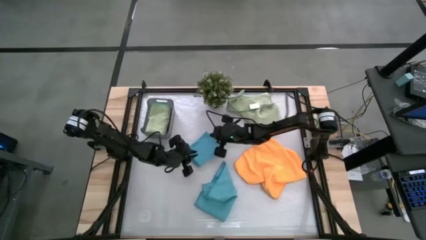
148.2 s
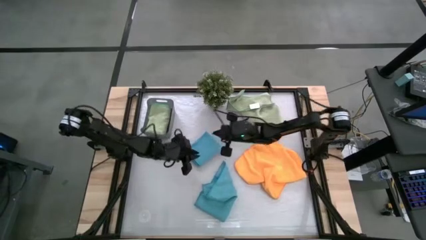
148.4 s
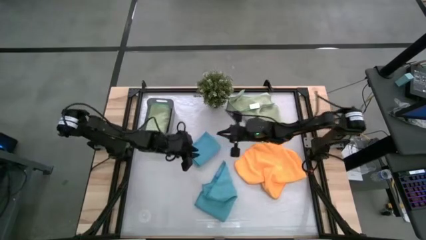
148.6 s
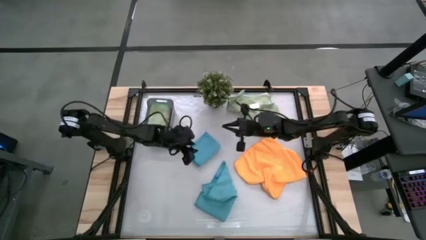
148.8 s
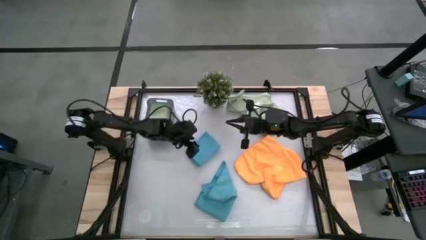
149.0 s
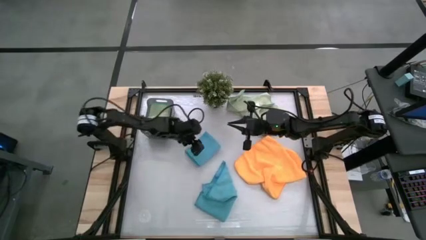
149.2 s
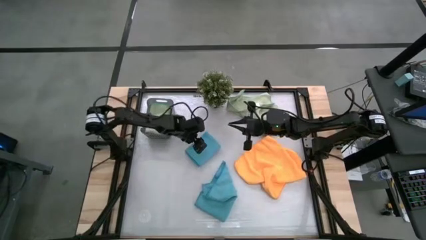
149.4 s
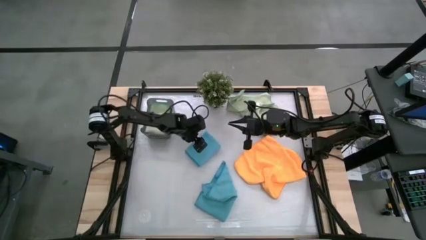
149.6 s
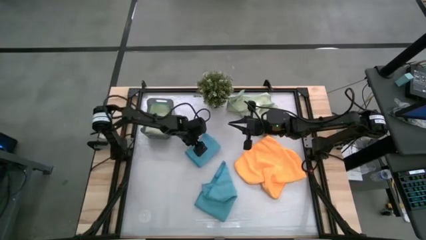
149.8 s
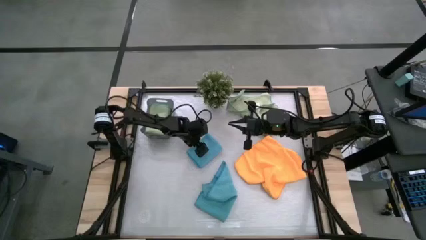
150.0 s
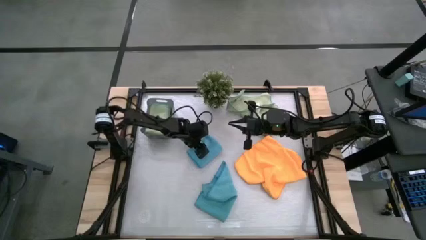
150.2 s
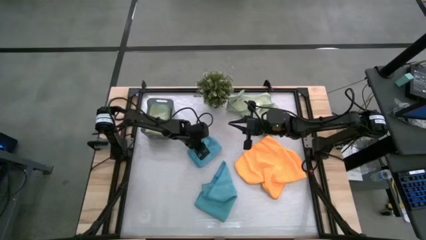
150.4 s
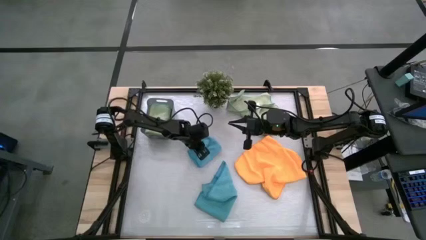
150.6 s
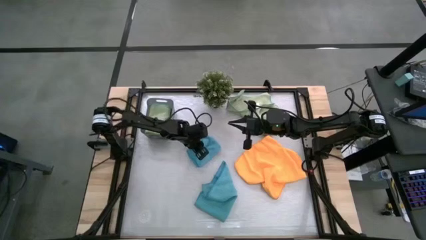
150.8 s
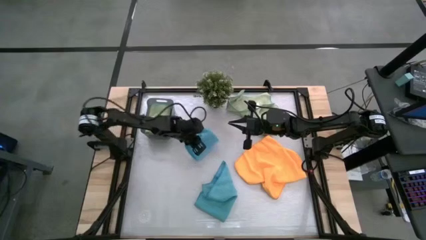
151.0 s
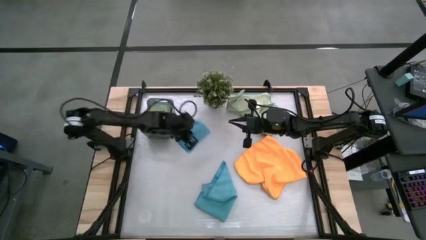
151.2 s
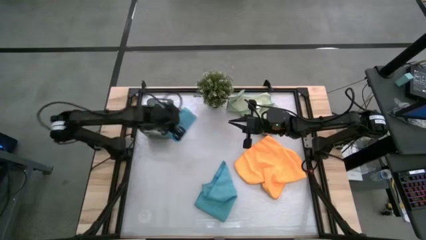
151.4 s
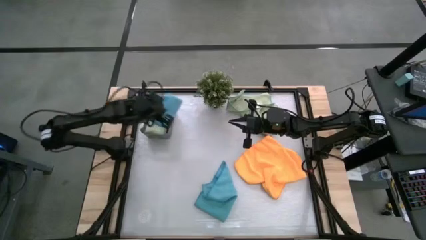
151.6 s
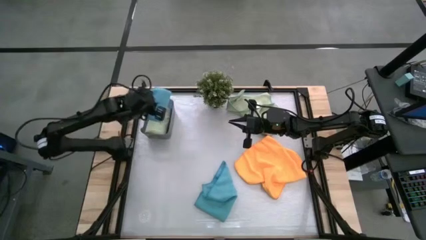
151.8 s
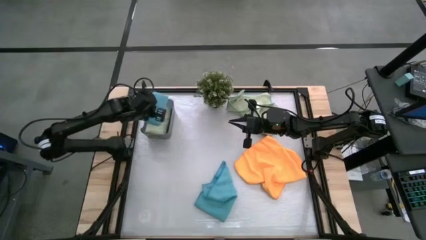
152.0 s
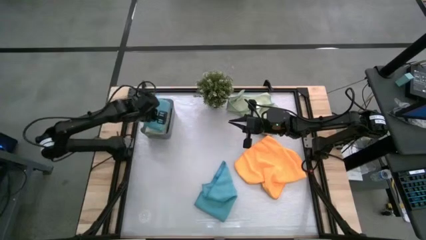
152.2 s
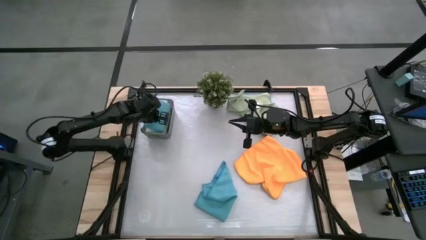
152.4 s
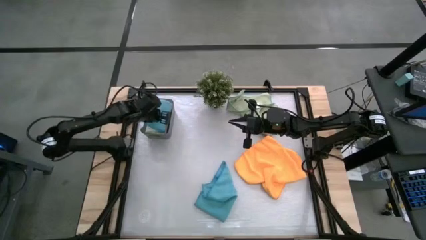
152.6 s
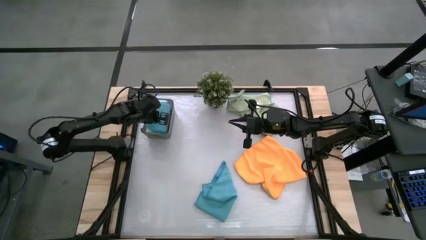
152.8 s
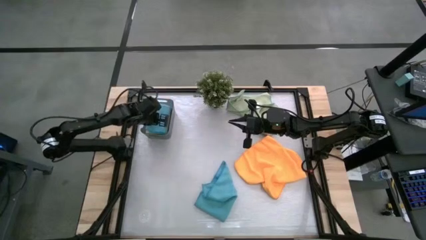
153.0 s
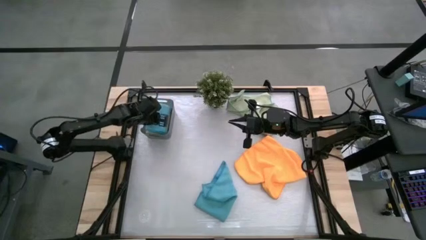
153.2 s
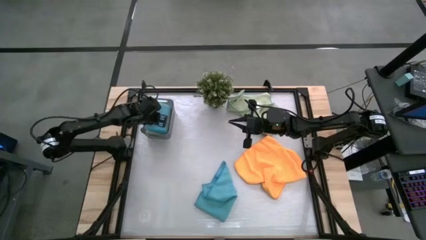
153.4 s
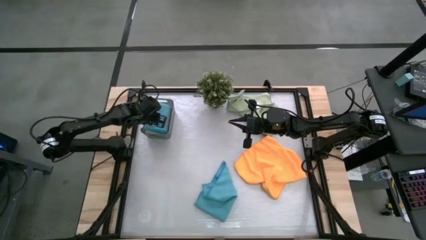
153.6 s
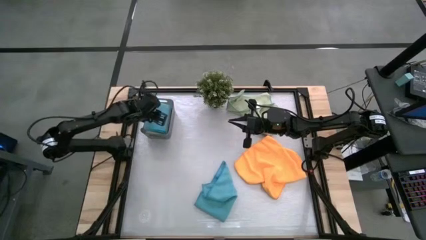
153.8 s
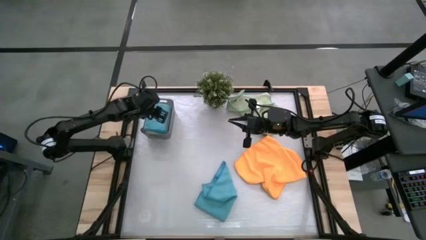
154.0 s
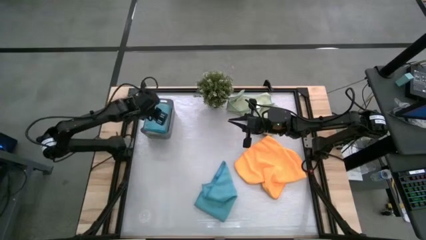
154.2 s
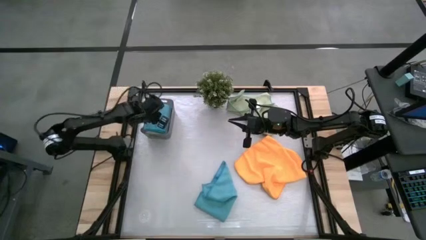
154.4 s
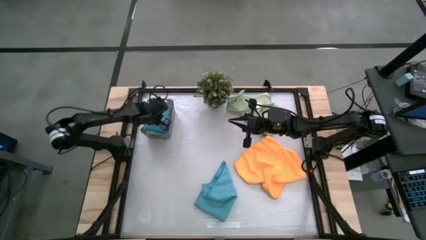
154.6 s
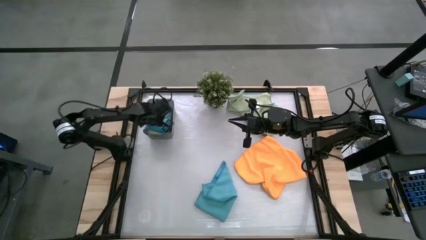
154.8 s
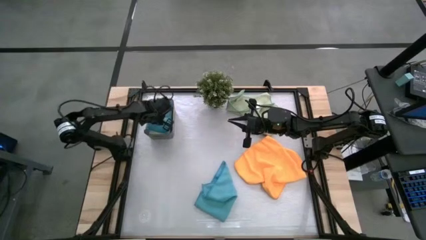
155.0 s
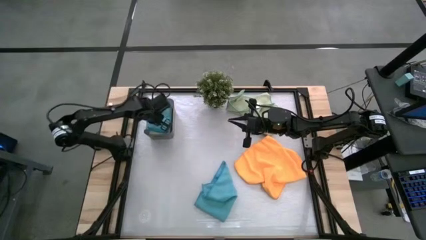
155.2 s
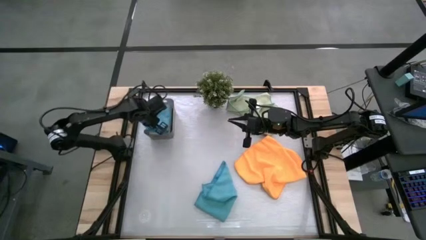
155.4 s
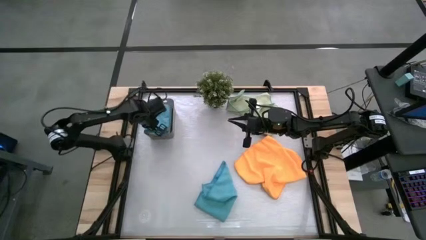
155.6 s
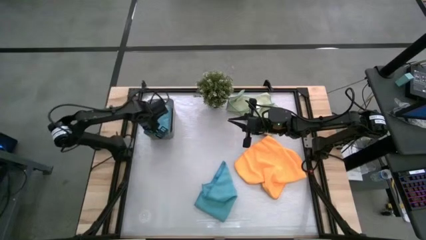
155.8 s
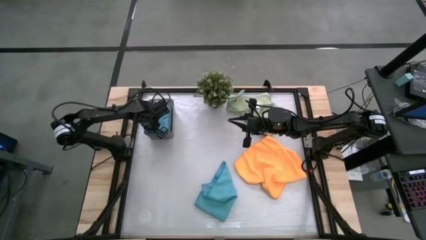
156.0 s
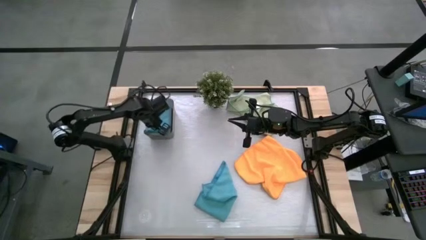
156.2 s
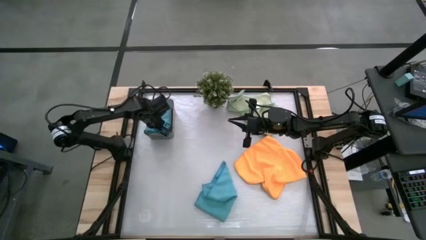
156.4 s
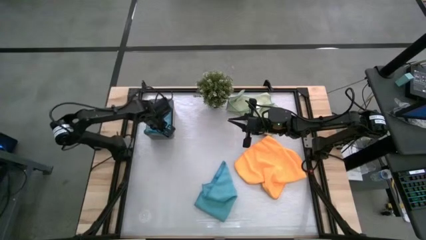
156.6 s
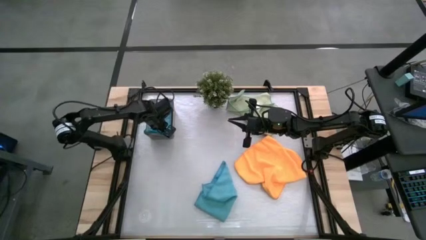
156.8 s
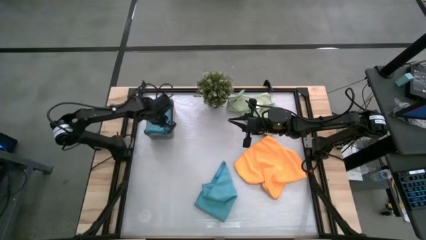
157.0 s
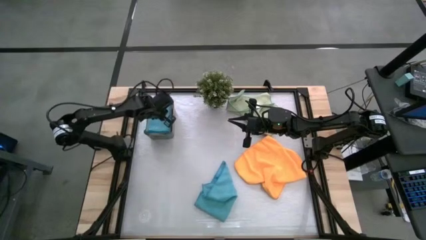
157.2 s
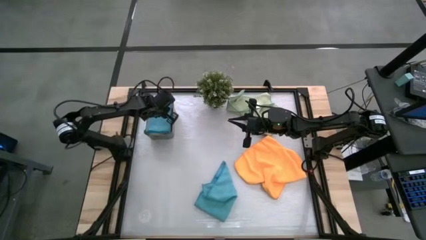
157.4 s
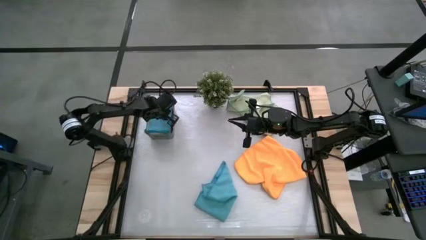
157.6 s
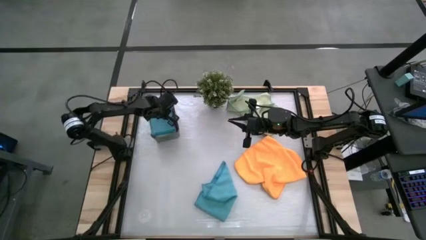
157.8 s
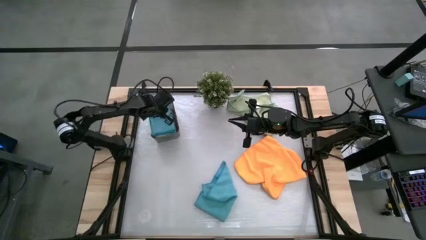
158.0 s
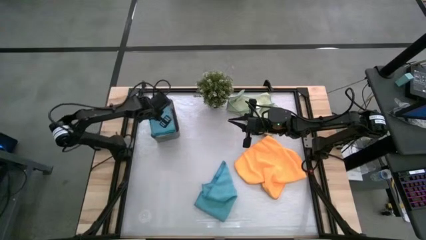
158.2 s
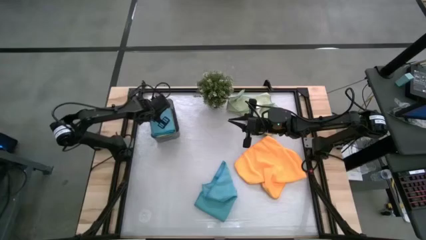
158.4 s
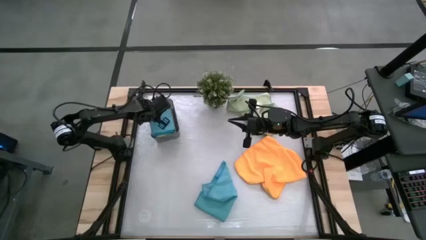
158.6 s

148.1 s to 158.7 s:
Task: Fold microfiber towels
Put the blue microfiber cloth into the black bin

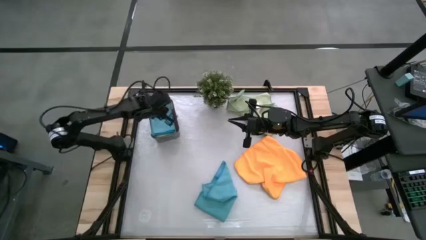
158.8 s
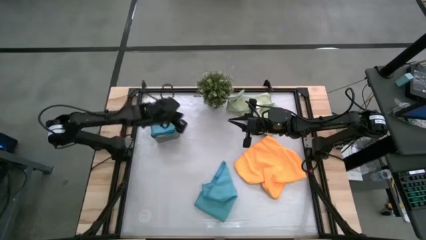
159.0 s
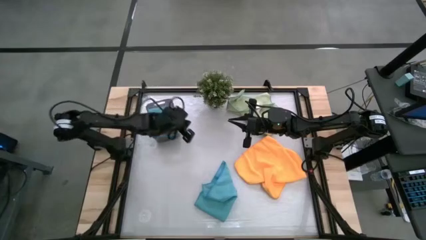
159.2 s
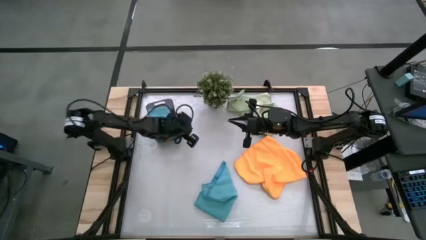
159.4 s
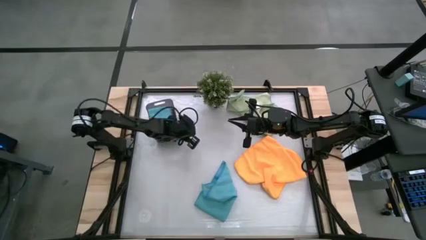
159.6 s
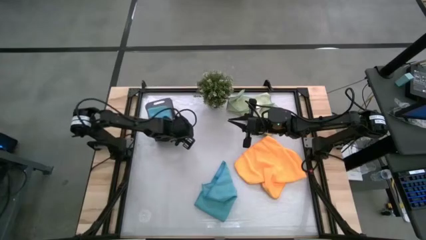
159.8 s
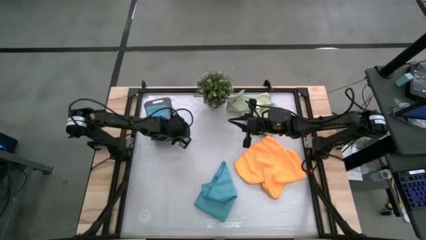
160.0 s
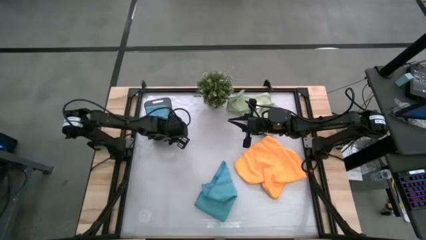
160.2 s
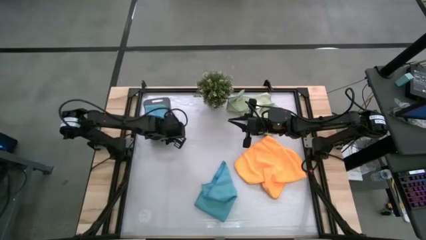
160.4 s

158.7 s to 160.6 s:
Adjust the black bin
